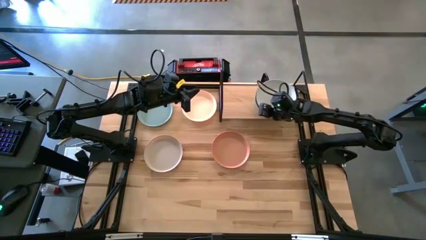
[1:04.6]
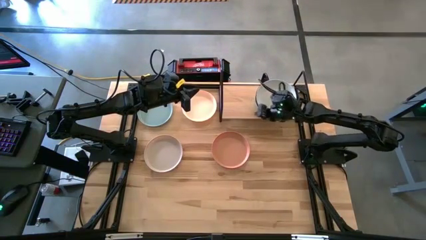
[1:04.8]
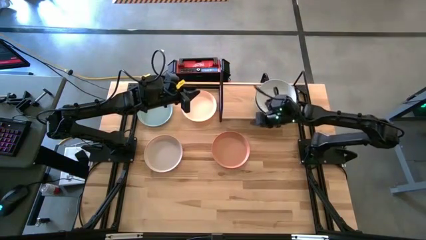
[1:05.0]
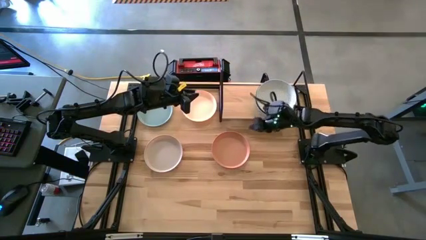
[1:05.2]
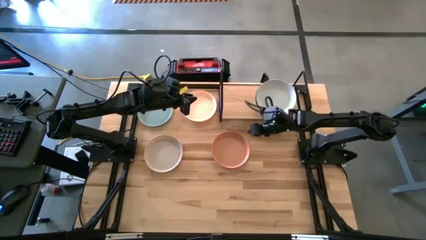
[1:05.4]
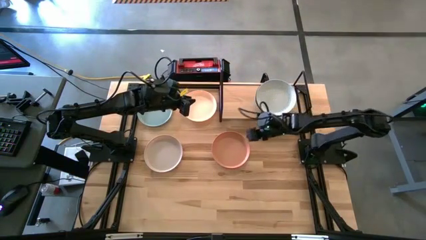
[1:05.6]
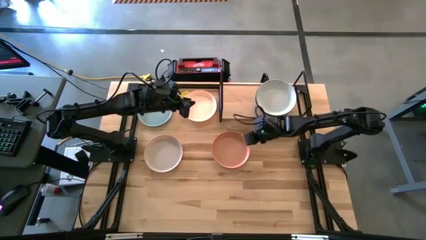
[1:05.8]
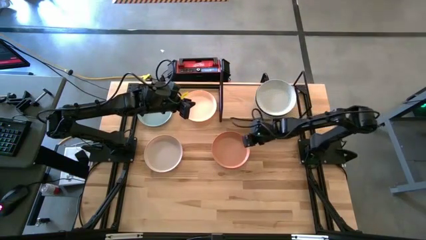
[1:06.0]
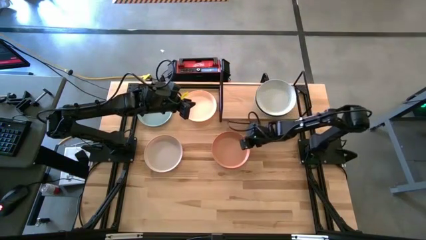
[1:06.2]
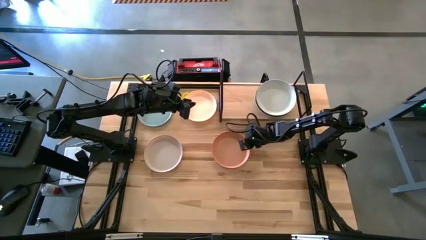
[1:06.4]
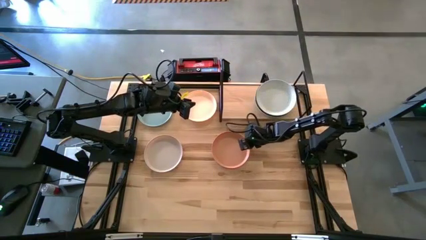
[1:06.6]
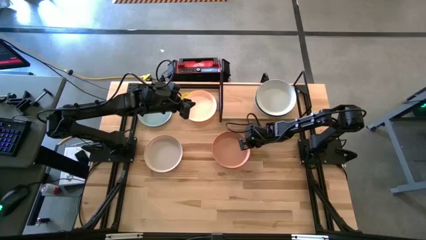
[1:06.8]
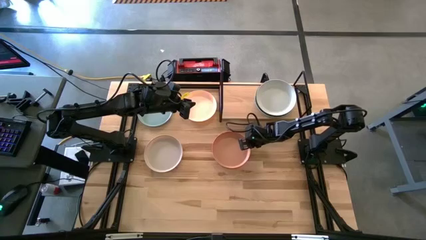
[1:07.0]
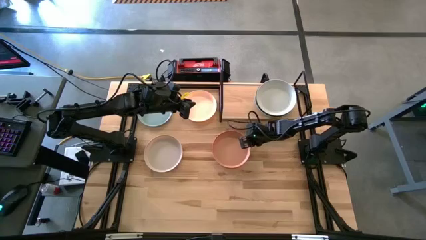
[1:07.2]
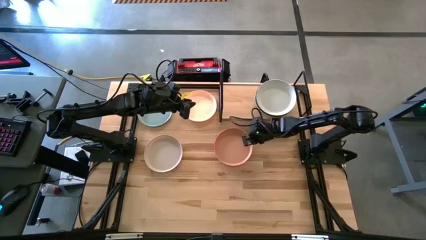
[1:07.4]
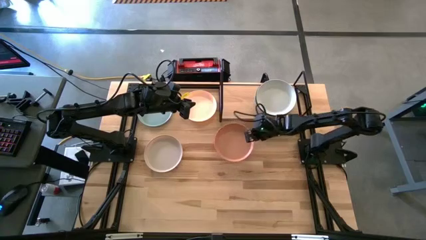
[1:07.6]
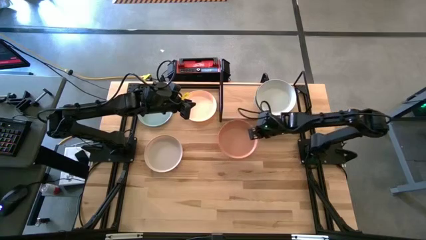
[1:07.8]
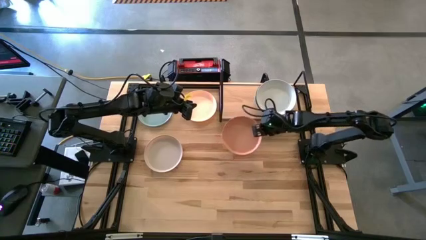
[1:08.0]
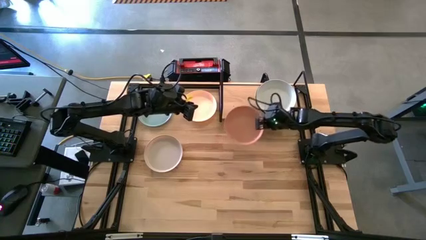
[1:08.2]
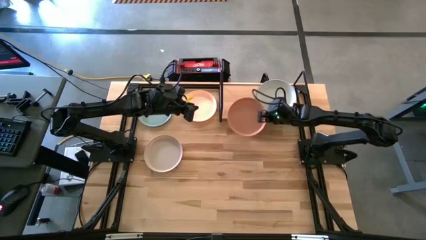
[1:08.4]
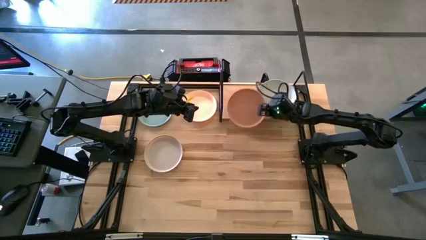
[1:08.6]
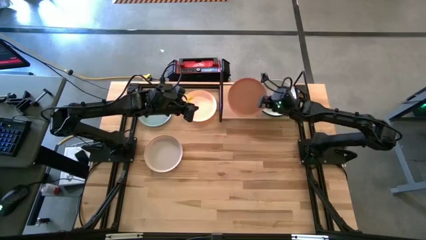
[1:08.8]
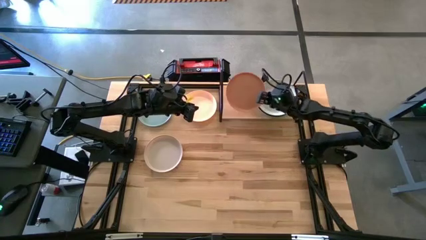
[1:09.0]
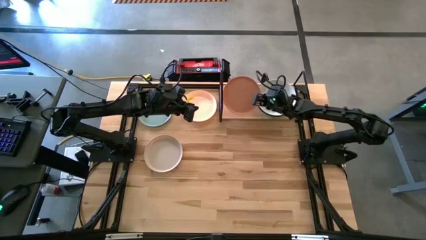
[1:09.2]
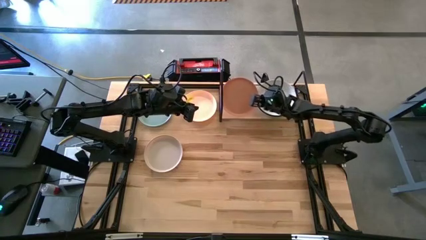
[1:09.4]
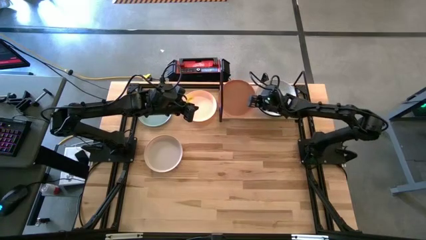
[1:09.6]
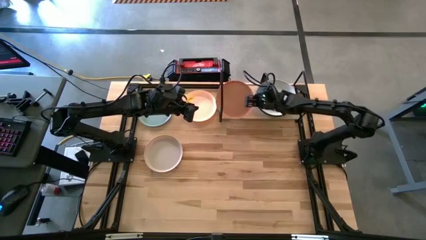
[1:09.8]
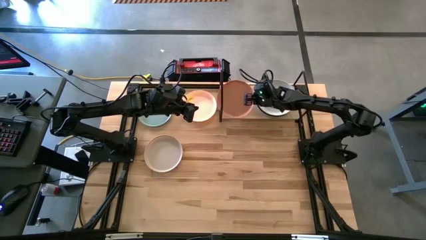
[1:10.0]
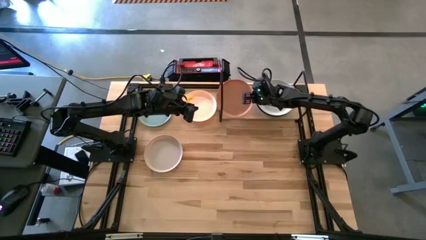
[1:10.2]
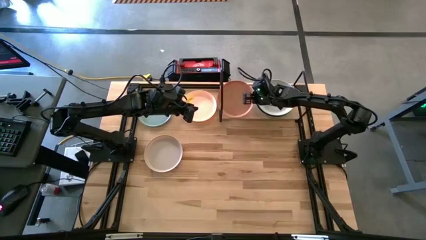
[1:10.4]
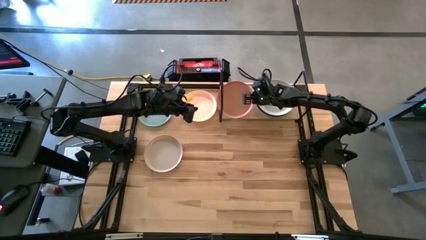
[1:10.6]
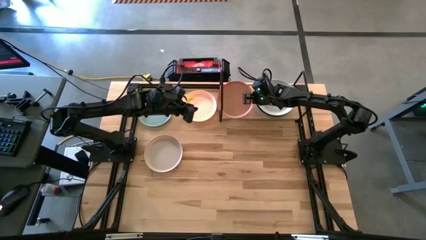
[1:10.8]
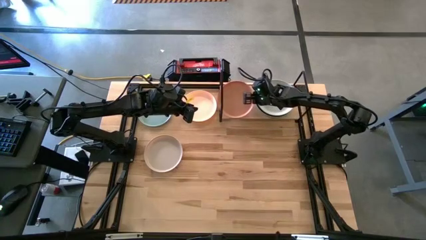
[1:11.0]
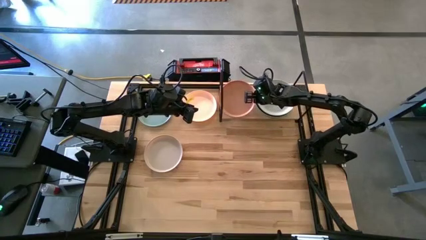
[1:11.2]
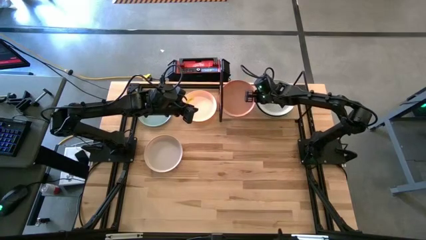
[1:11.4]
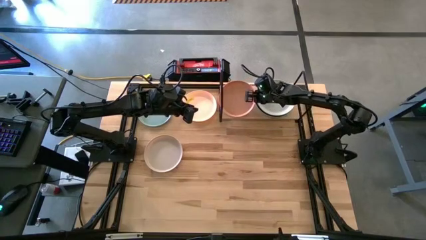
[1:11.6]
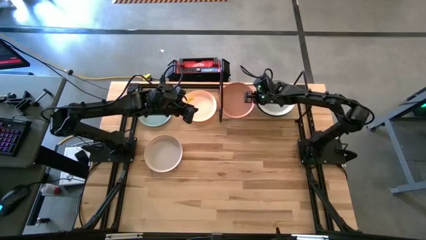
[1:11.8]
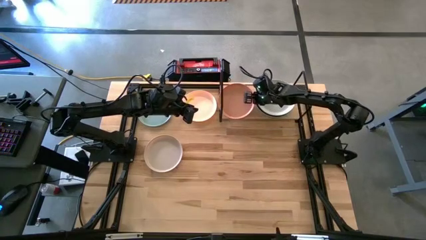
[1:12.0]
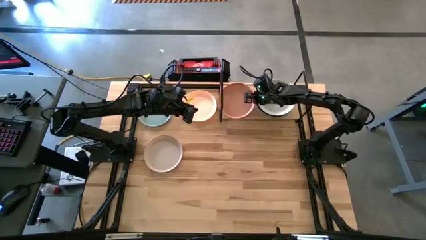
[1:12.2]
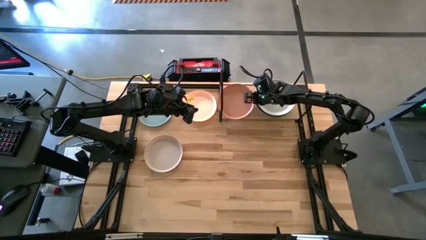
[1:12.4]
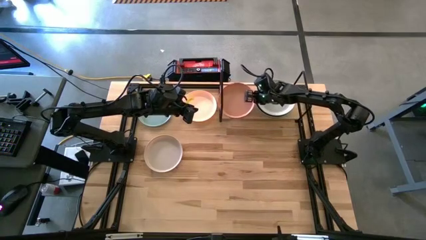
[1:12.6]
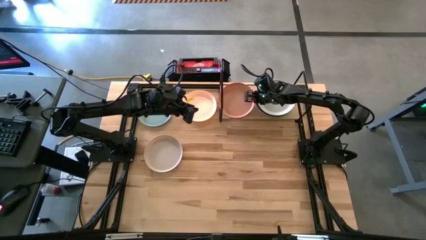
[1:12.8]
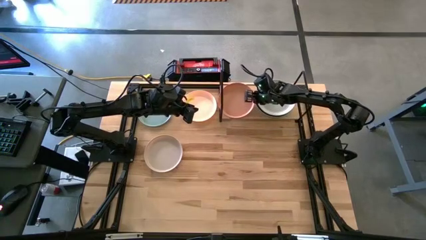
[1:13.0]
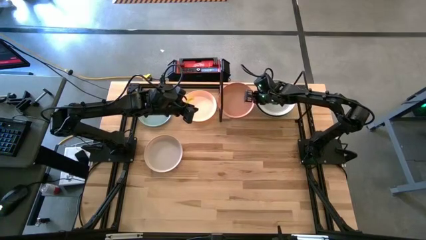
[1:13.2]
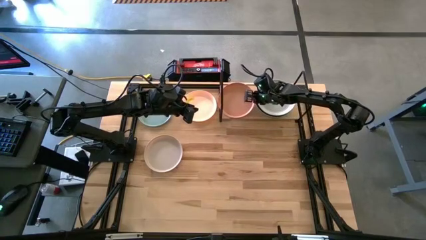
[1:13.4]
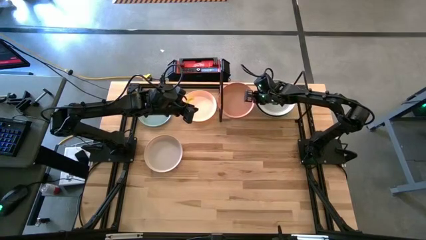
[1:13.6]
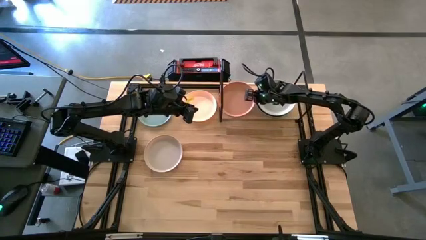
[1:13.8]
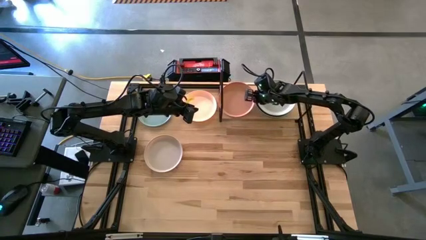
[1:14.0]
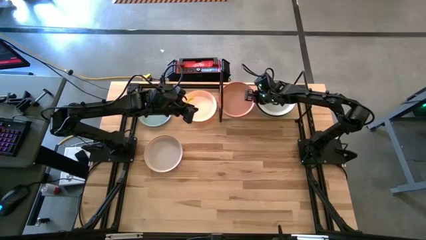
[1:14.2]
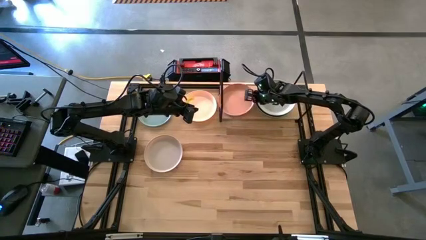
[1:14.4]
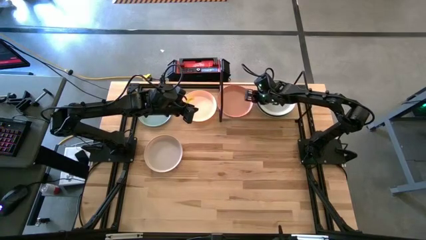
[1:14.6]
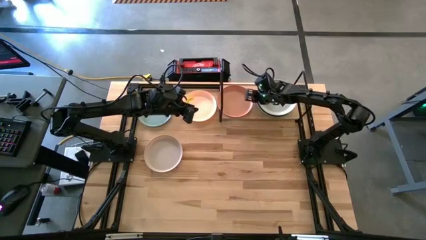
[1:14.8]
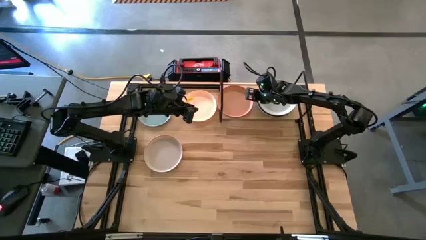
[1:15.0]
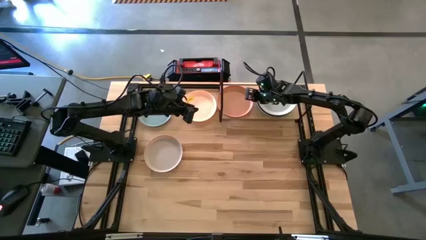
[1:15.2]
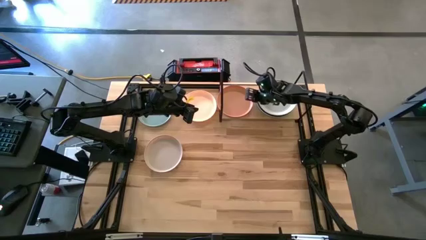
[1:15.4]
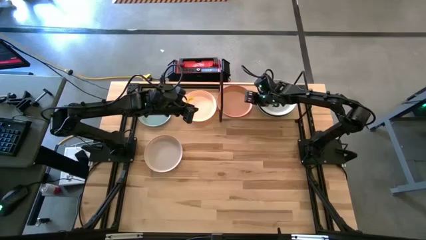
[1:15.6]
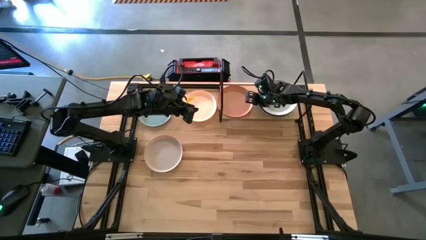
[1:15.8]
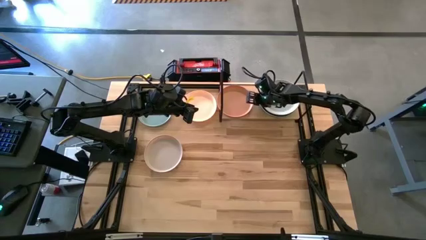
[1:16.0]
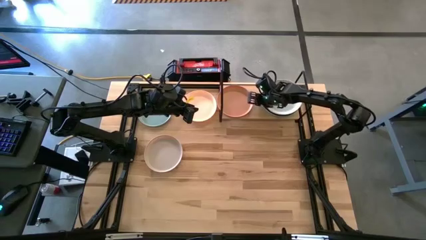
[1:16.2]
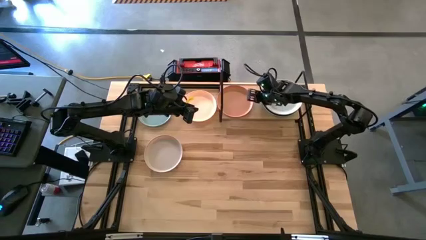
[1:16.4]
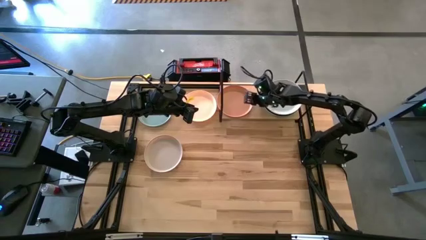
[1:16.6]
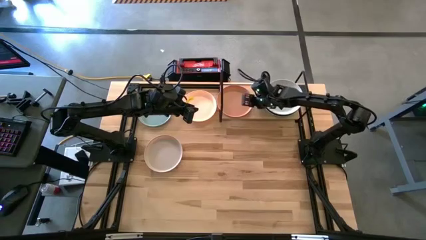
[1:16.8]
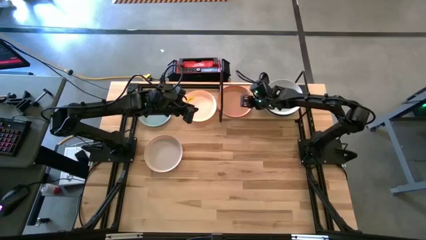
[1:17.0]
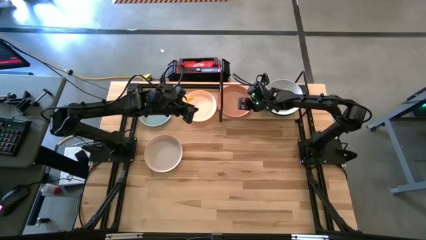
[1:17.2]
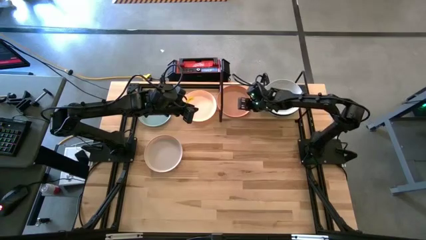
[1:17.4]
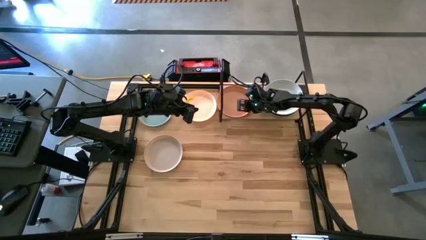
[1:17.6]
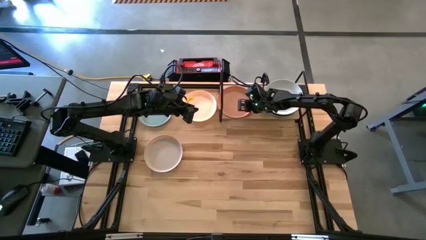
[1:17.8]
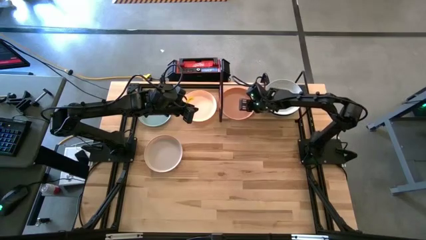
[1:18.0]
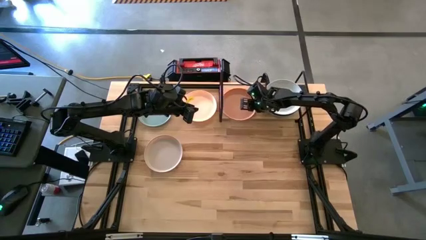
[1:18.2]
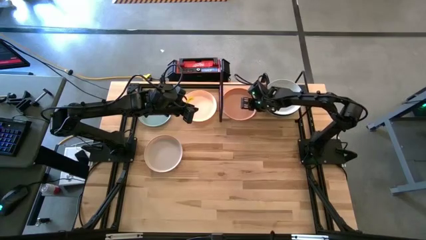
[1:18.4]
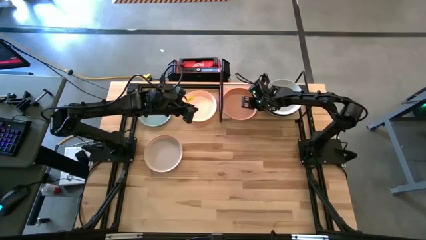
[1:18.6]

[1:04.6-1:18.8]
Task: Place and stack plates onto a shelf
Put the orange plate on the shelf
